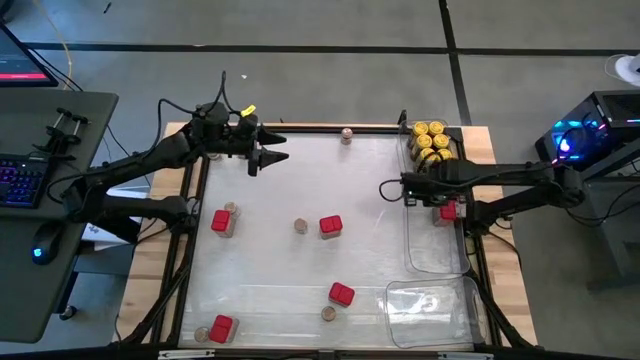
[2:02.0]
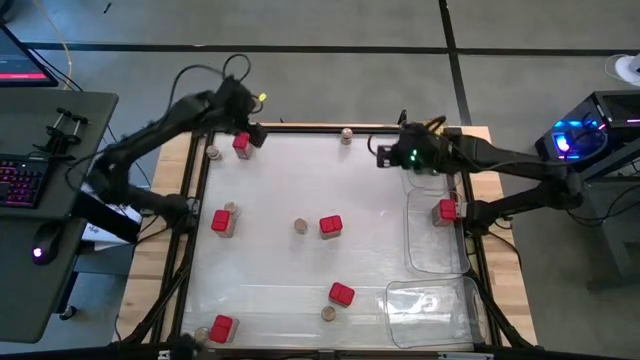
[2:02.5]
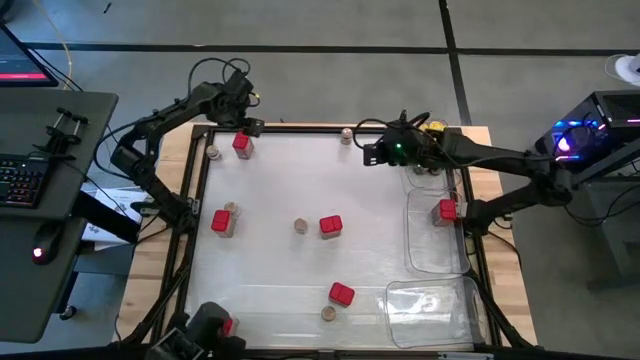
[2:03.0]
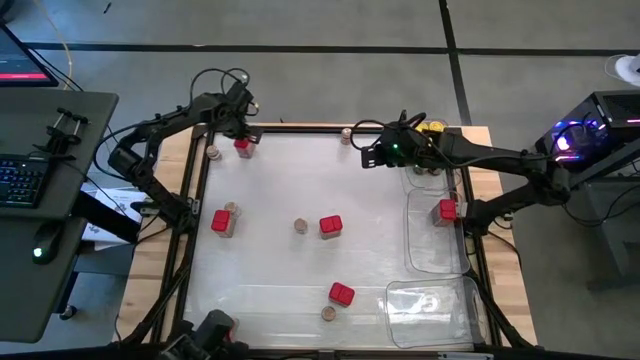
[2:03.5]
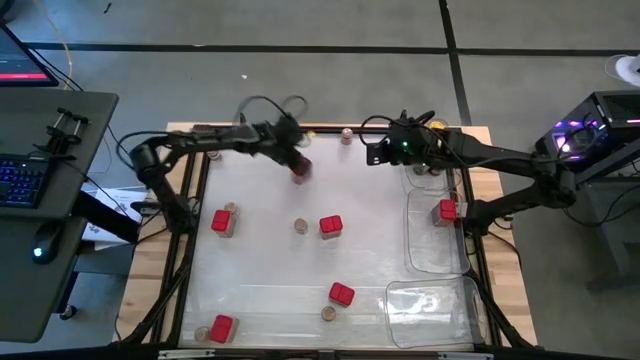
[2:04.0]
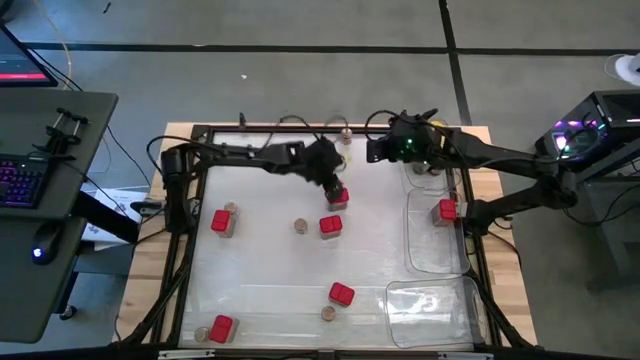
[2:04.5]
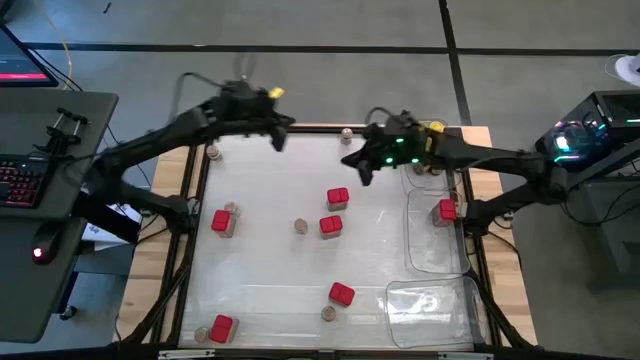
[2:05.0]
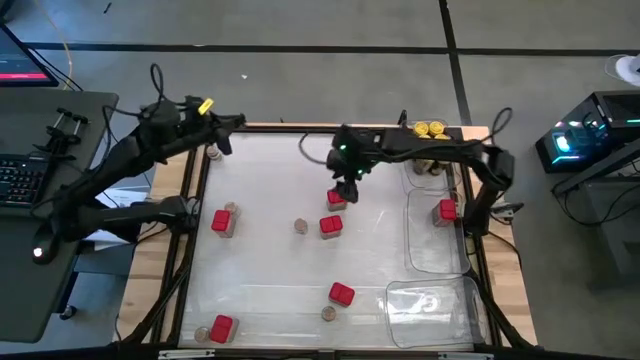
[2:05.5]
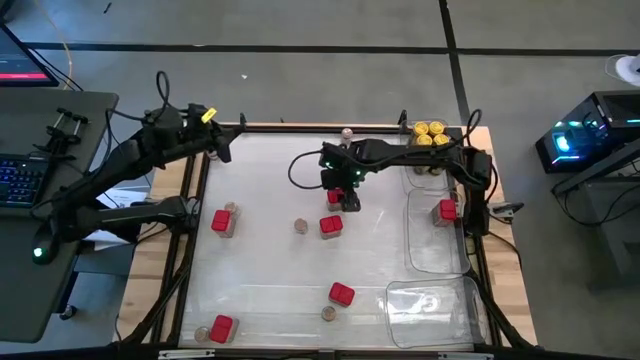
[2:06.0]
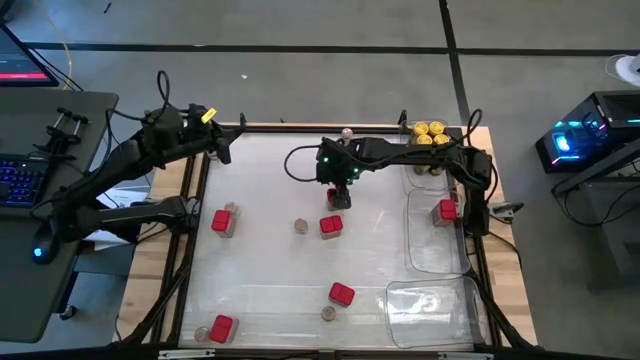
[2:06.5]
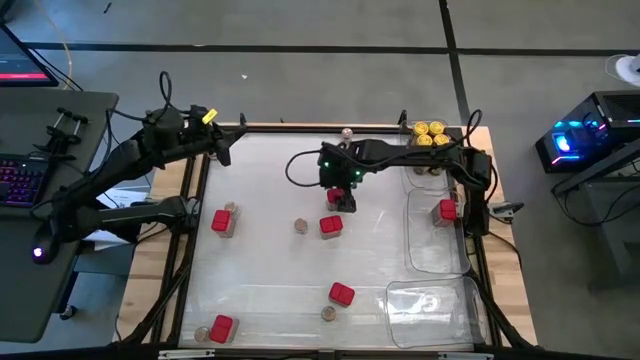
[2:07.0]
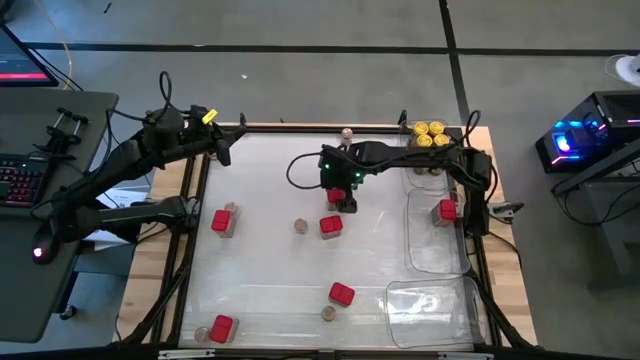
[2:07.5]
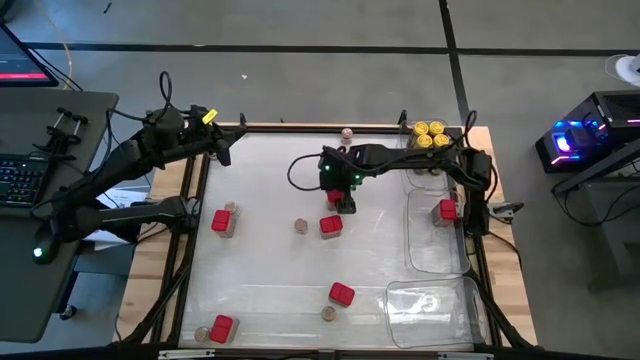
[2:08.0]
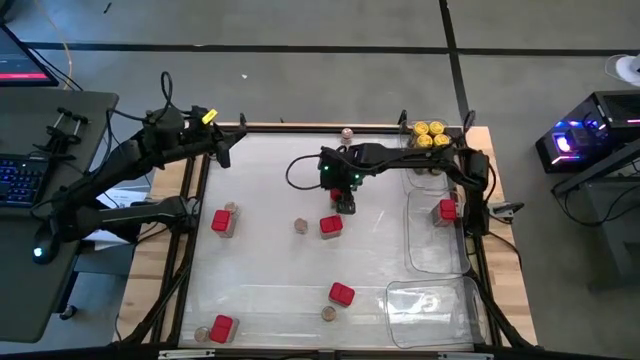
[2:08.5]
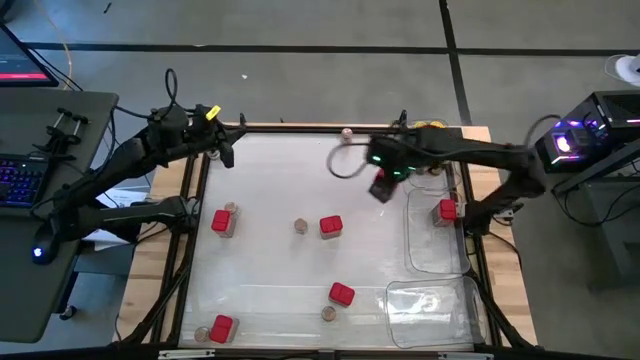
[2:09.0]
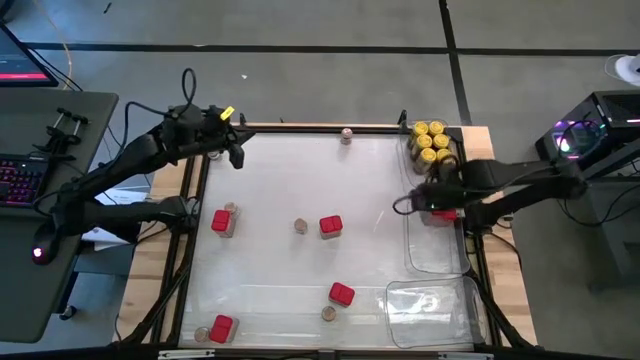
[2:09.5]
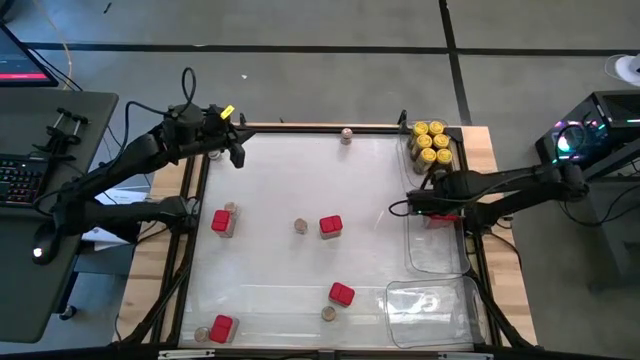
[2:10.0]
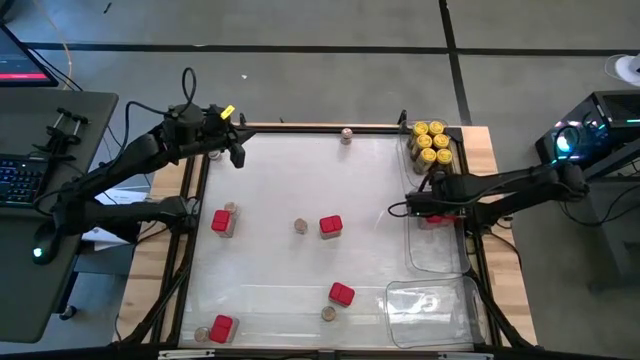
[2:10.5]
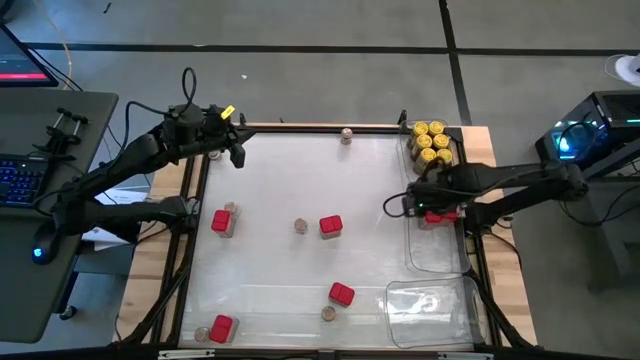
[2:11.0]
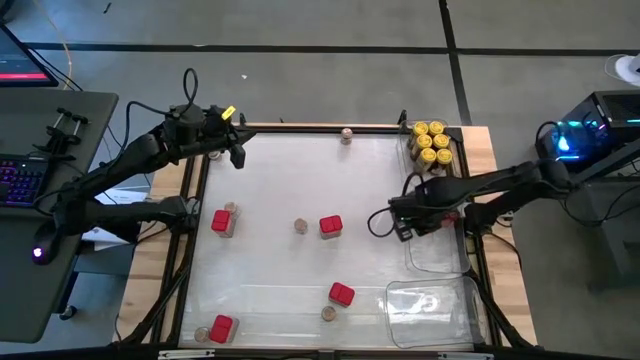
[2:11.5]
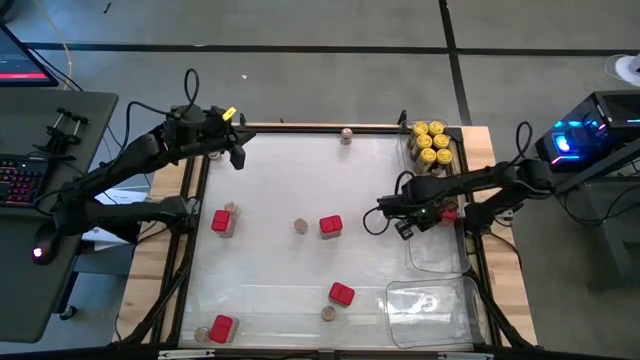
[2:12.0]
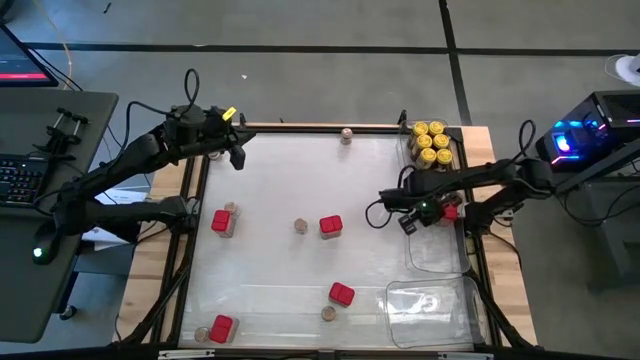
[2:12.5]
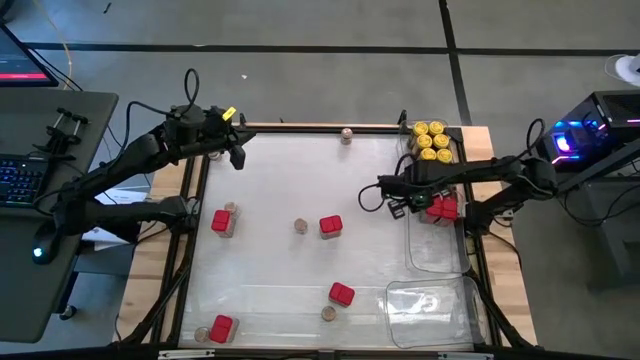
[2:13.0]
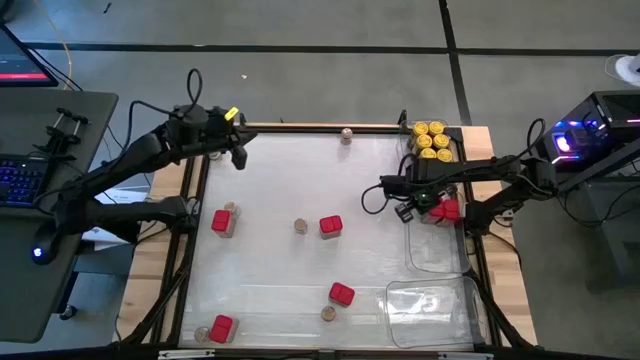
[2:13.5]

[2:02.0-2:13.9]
Task: Sort spices by type
Put the red seasoning can into the middle transparent bin

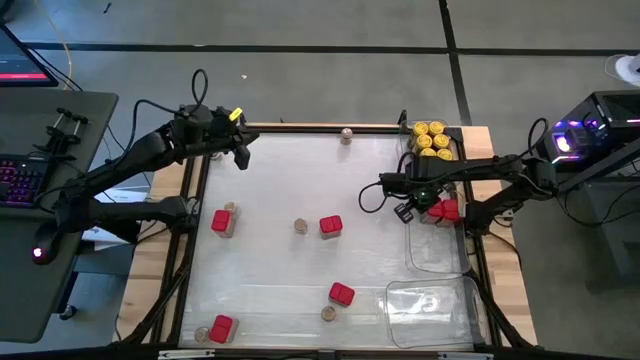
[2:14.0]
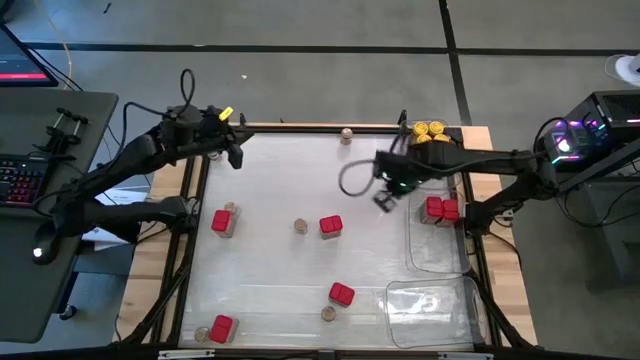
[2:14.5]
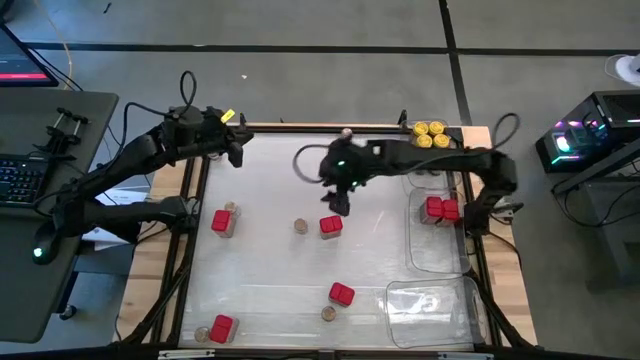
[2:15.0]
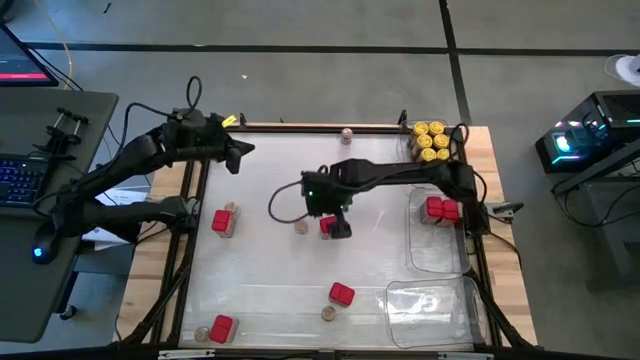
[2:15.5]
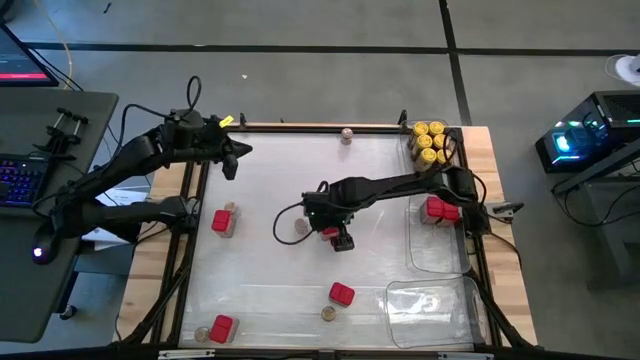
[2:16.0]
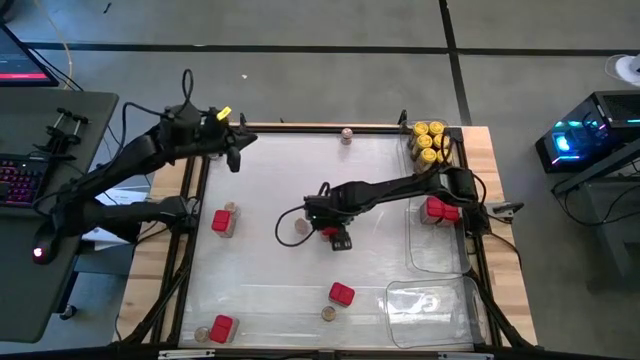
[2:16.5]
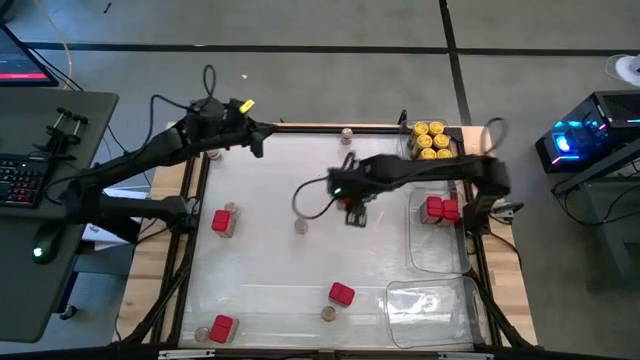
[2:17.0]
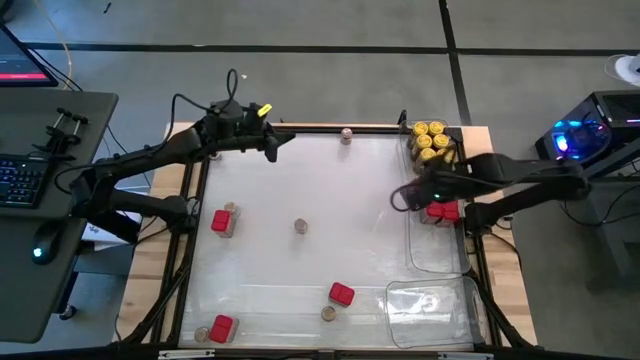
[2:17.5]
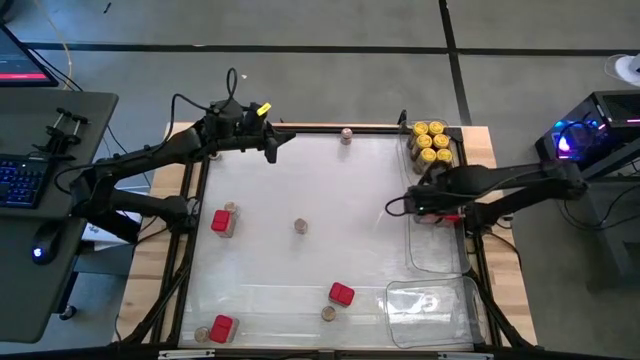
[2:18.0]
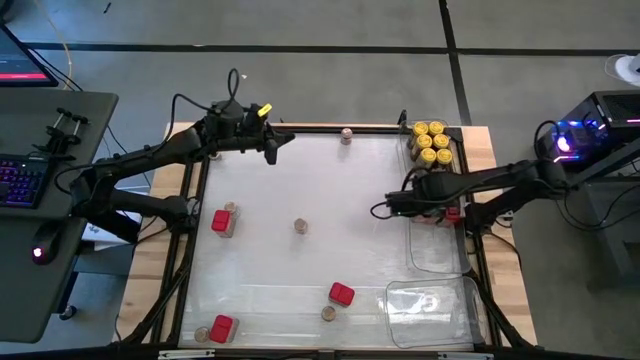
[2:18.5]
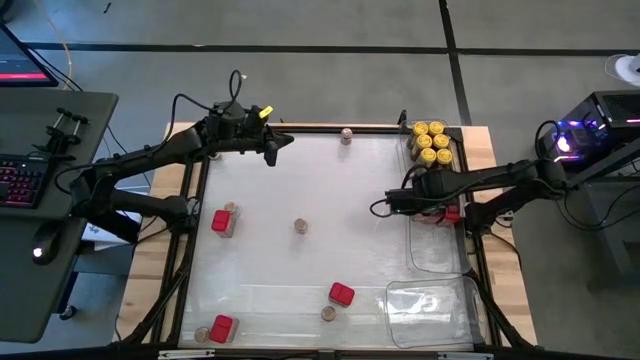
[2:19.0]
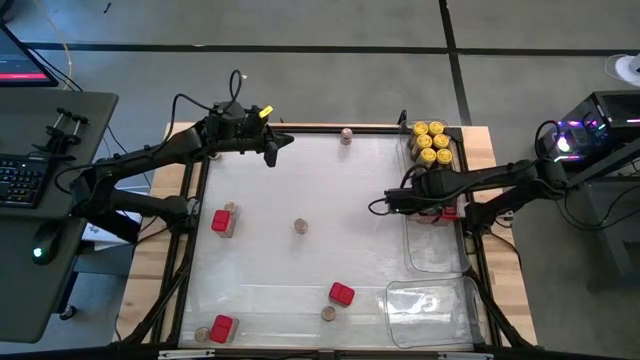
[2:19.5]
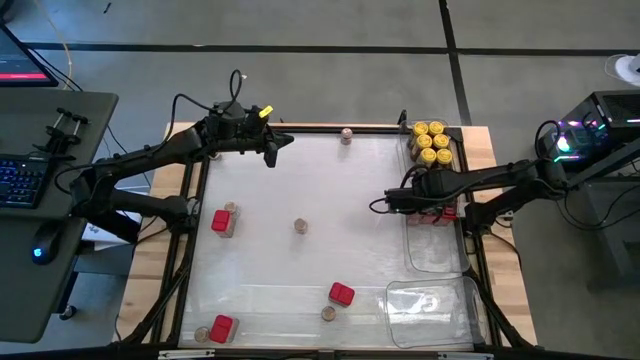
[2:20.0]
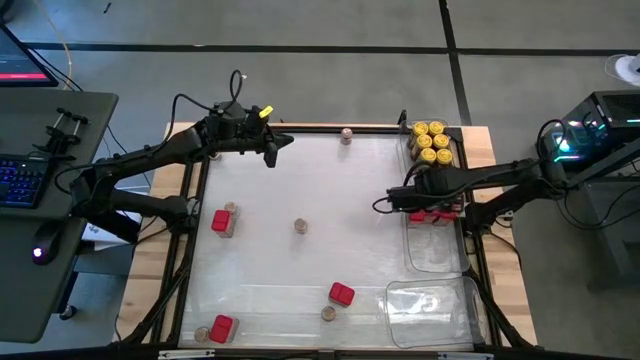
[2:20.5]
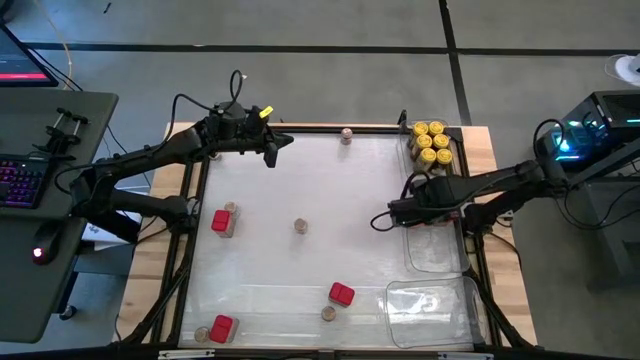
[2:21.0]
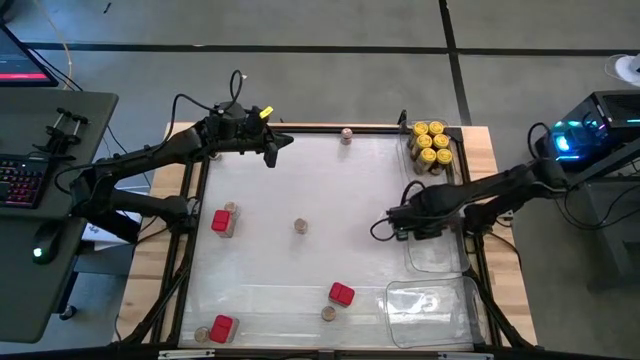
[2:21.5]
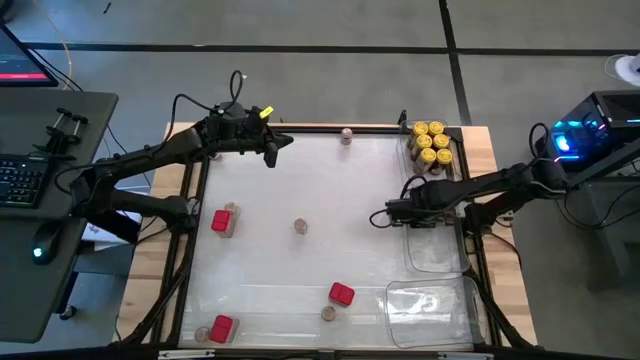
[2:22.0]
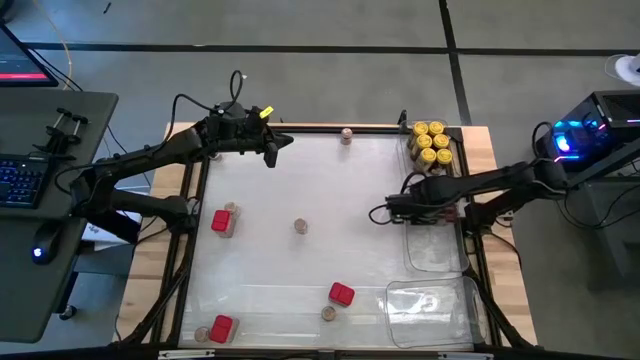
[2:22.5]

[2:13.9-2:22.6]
Put the red seasoning can into the middle transparent bin
